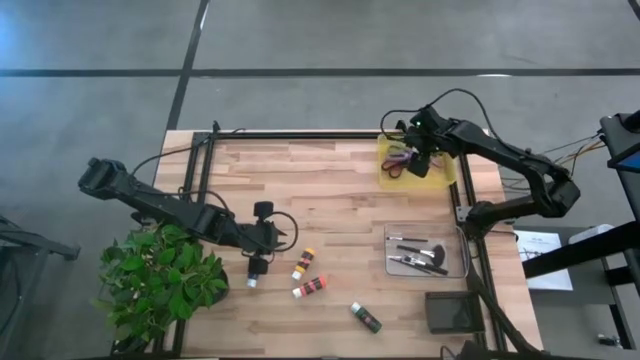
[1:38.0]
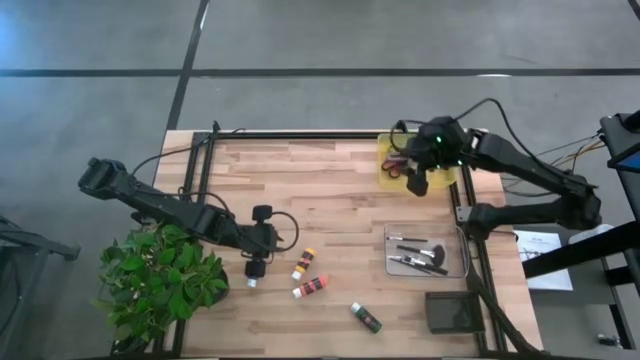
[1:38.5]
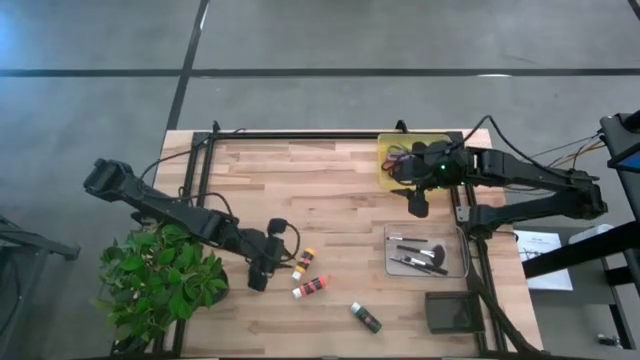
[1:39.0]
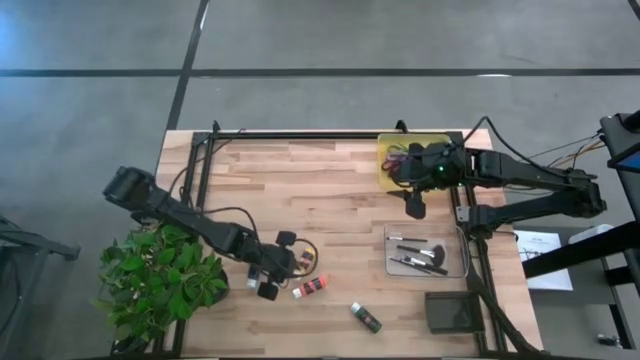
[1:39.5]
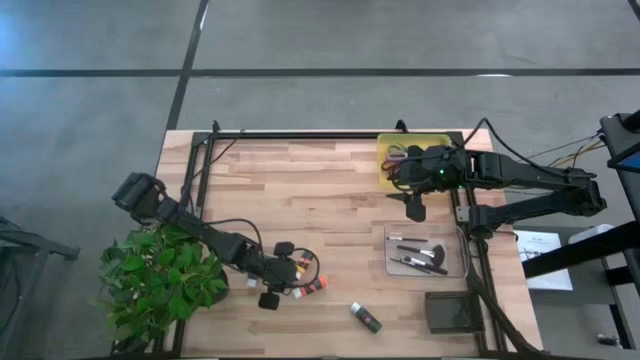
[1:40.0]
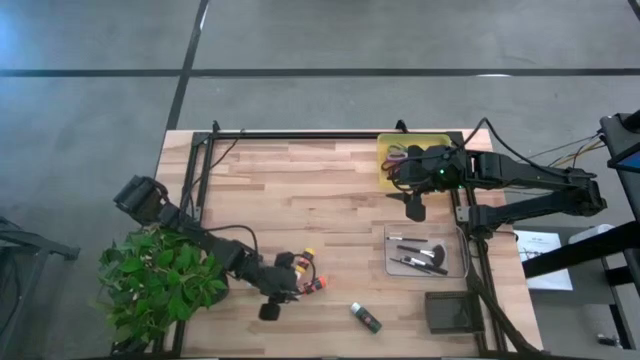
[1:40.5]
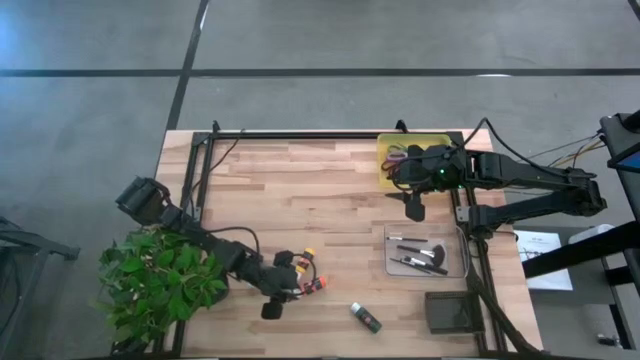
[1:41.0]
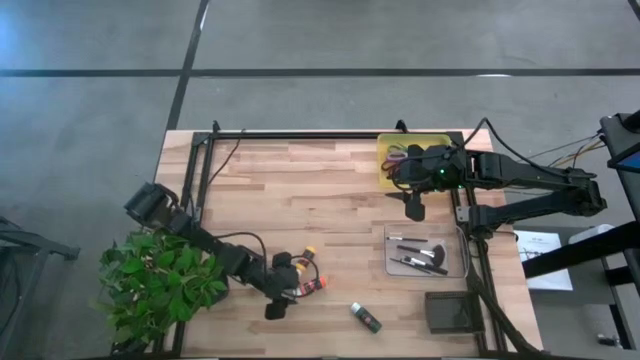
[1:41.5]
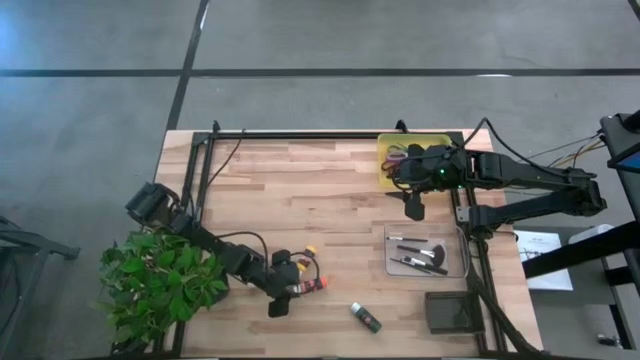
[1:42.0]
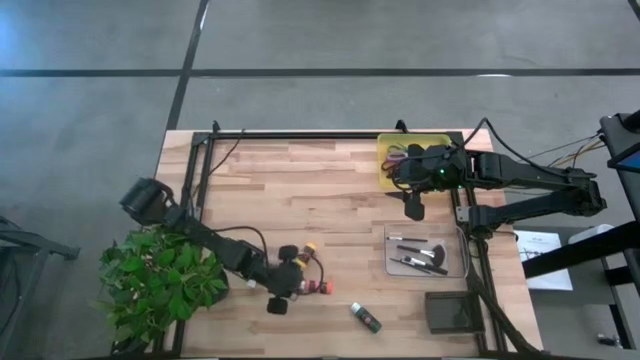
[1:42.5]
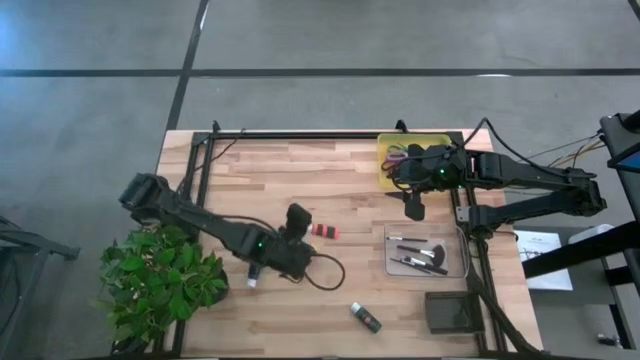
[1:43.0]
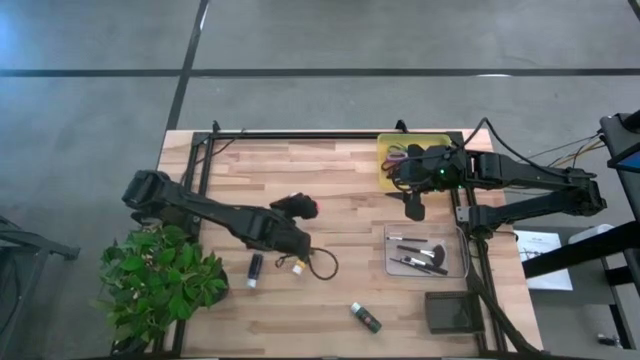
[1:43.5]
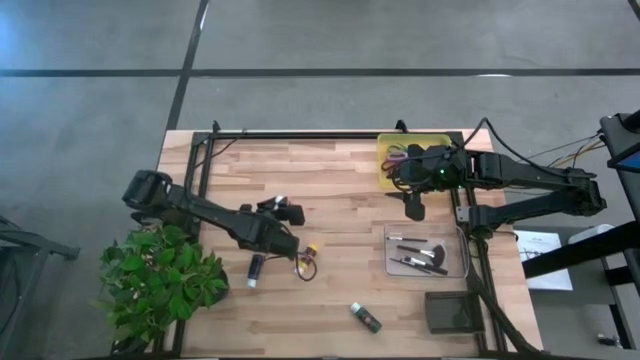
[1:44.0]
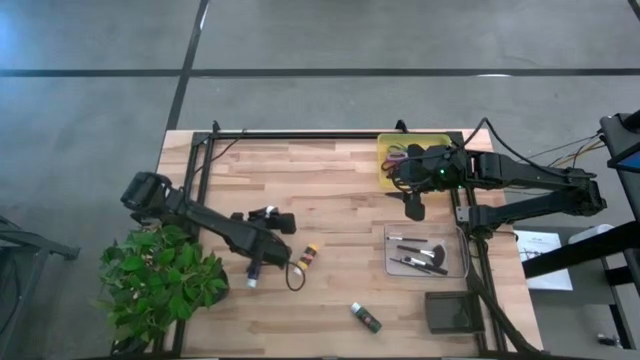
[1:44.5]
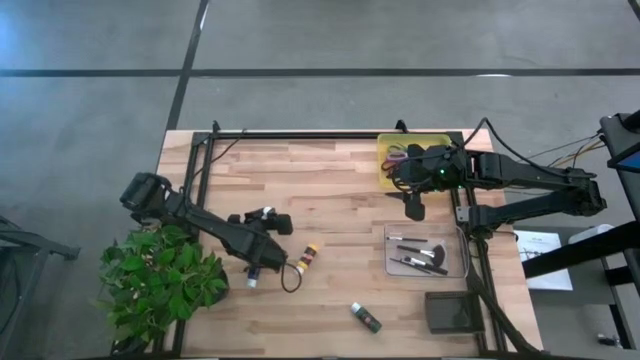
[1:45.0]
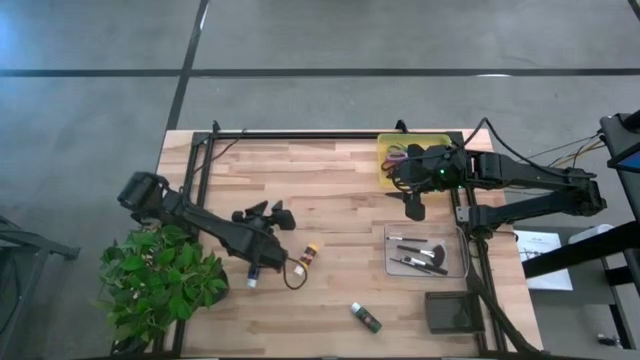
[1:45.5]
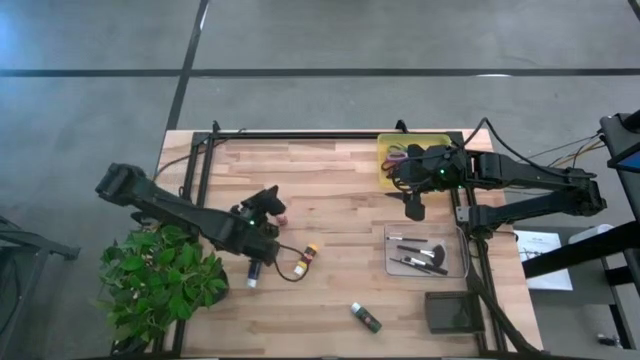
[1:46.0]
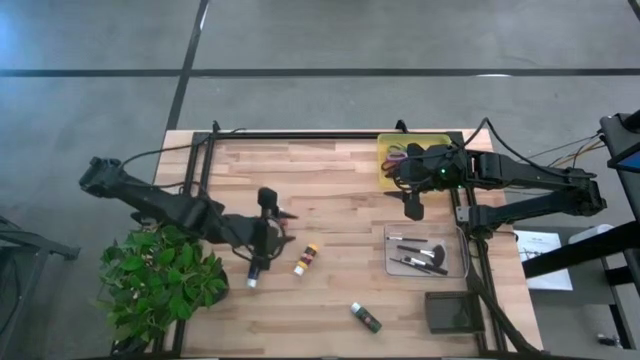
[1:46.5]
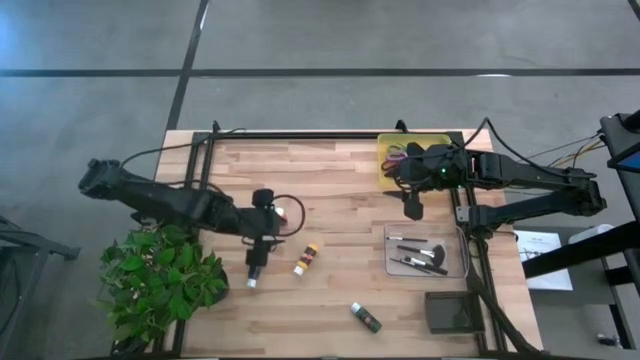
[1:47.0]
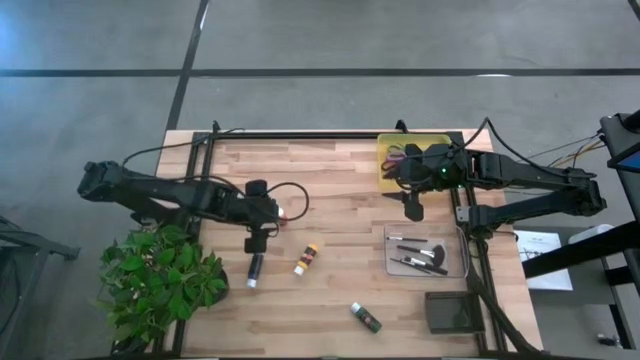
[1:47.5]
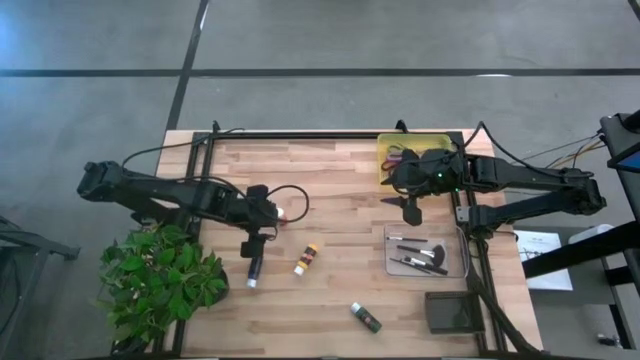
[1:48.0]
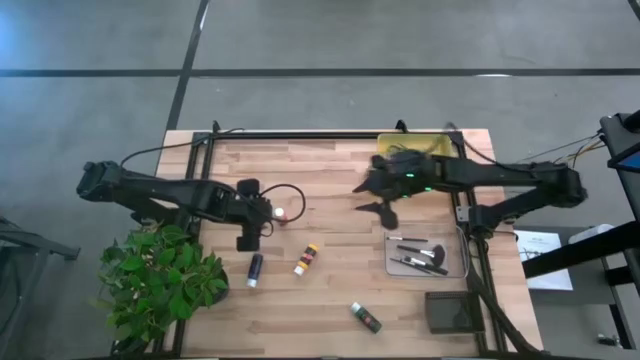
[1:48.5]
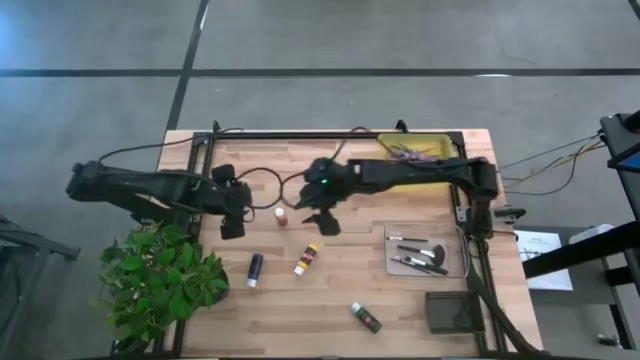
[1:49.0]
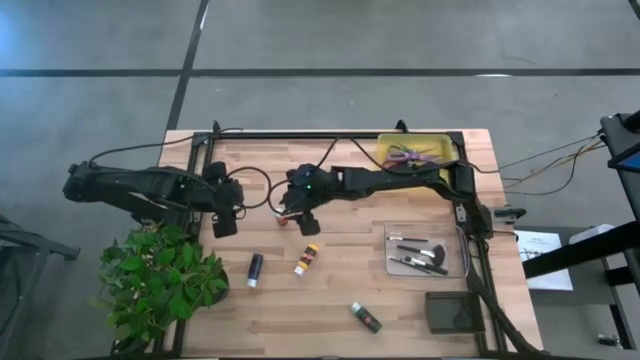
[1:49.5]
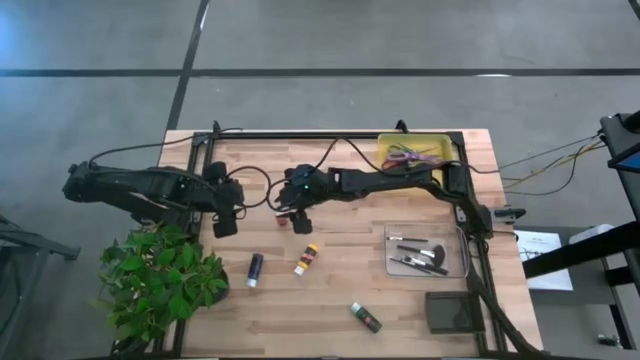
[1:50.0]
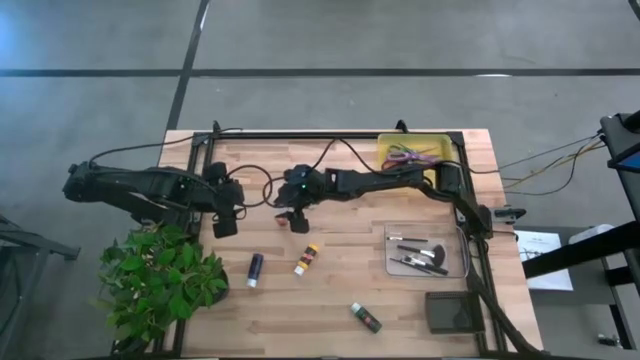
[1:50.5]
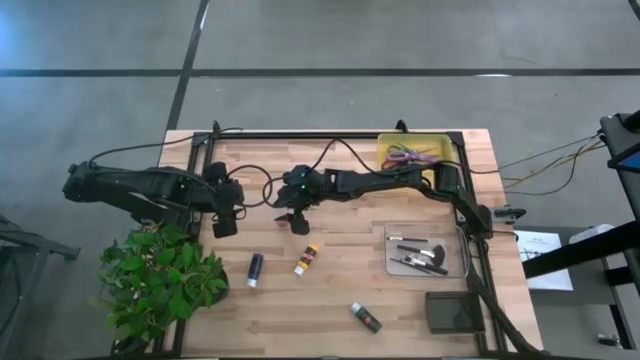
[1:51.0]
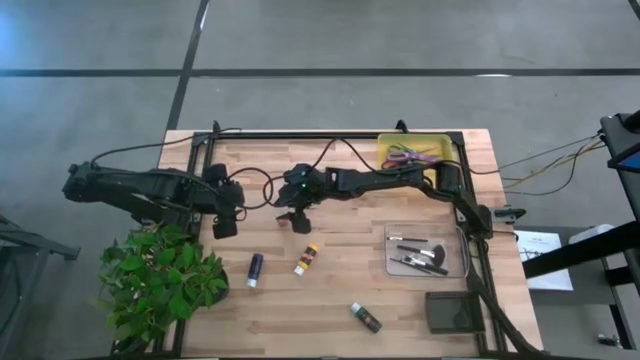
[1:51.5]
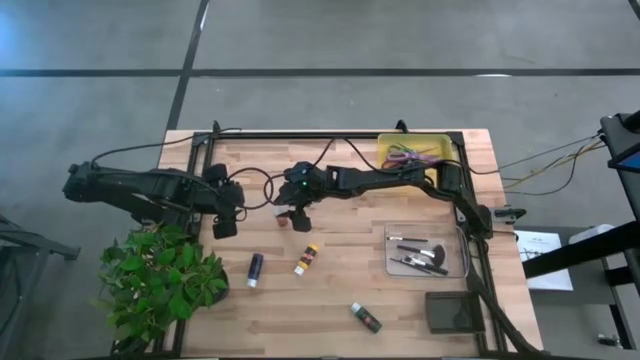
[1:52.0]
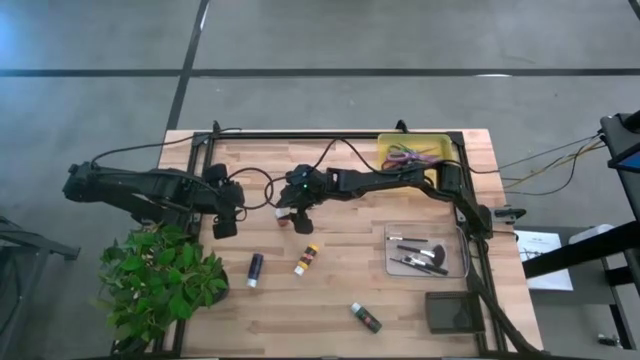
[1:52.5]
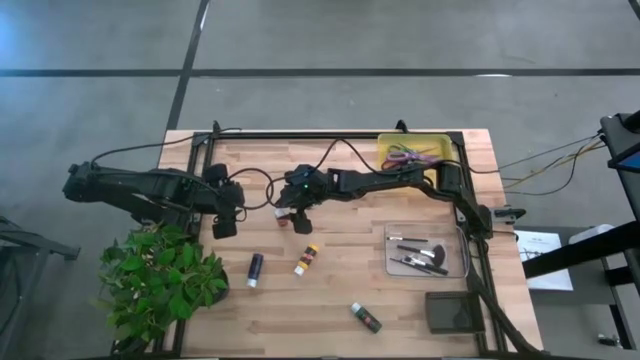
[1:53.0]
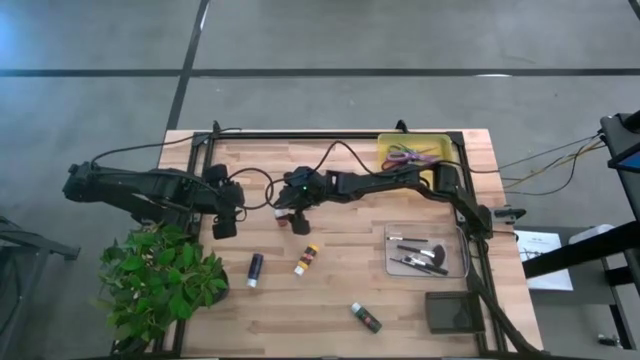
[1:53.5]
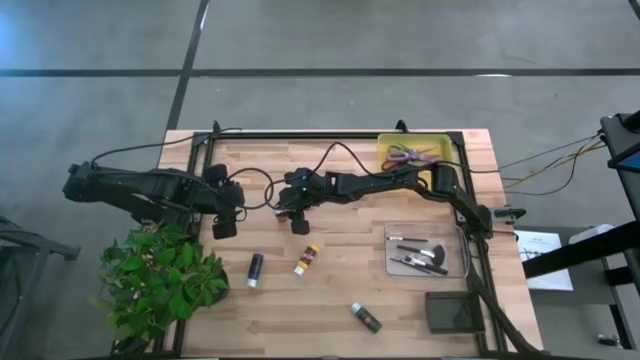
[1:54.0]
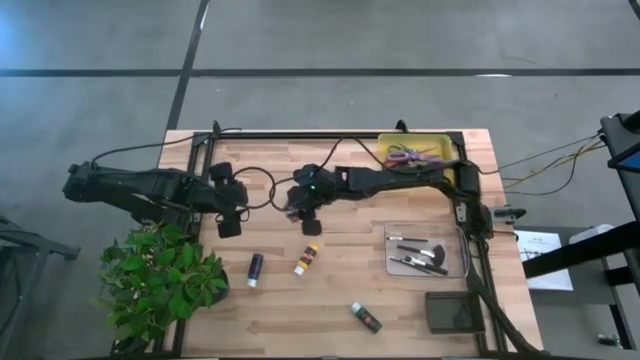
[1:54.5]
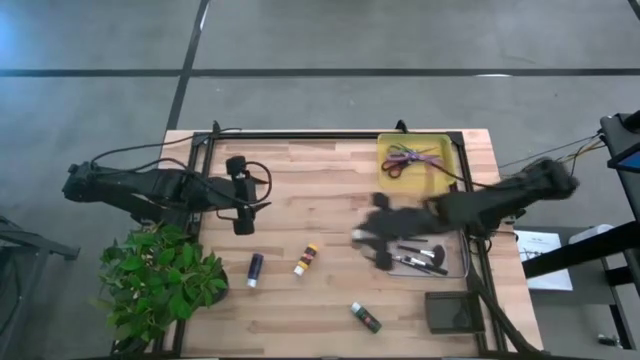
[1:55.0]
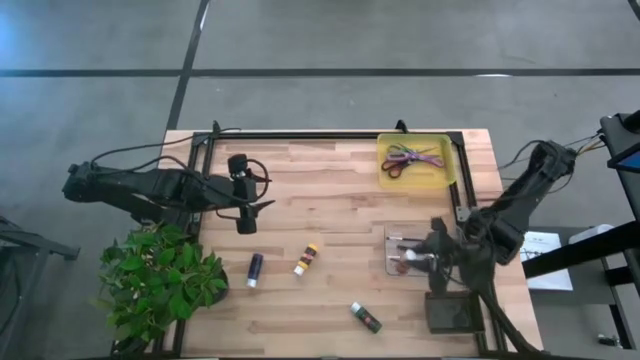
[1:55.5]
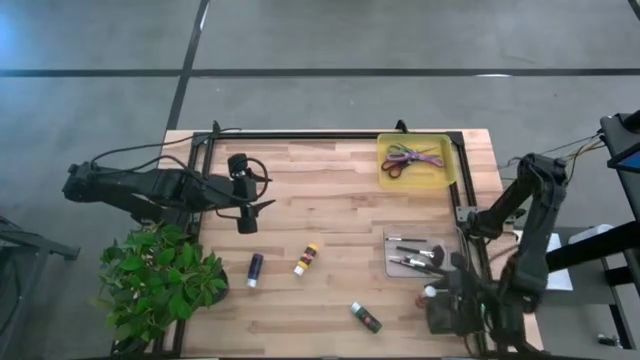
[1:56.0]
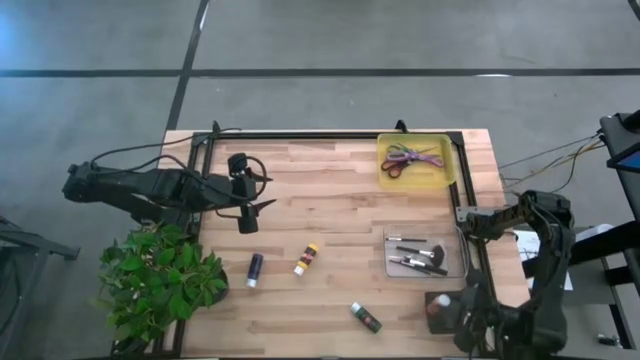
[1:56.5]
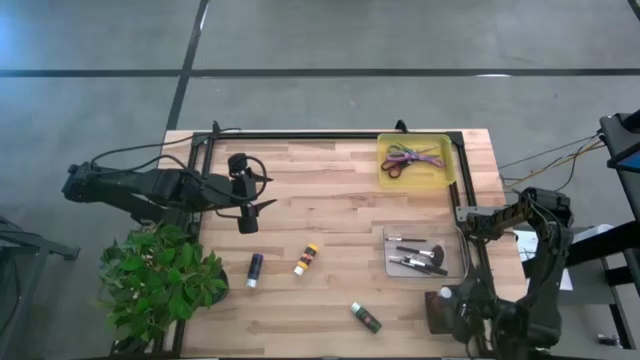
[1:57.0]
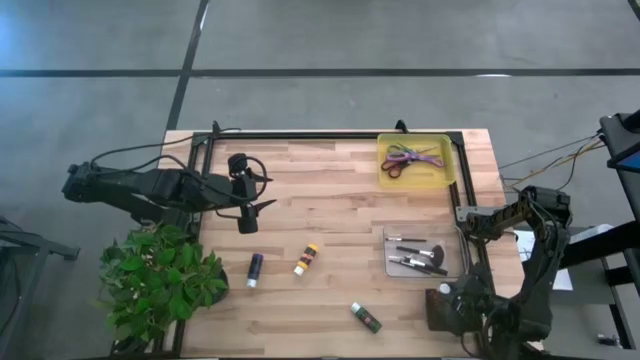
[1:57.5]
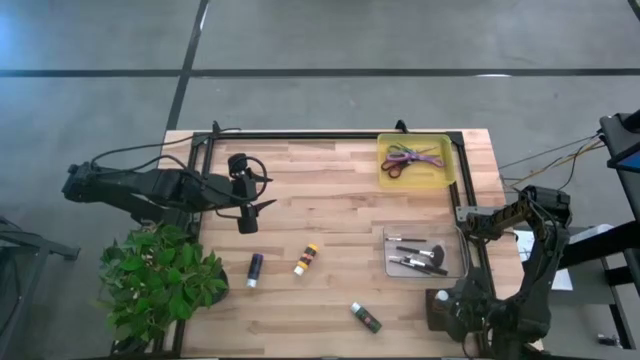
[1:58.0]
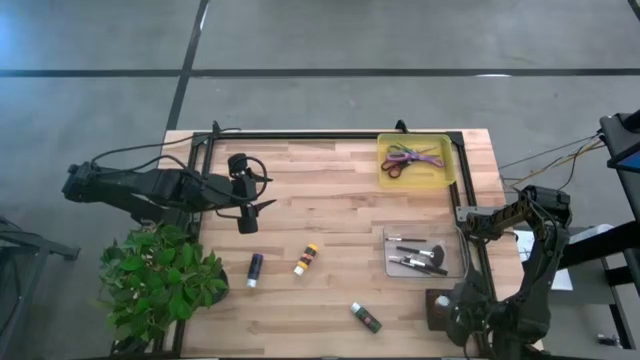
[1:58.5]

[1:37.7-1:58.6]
Task: Pick & Place Paint Supplies
Put the orange paint bottle into the black bin
